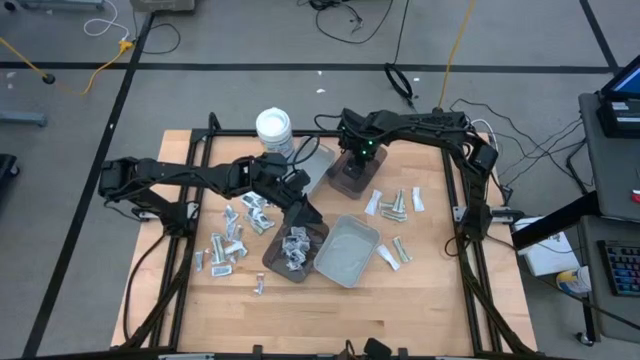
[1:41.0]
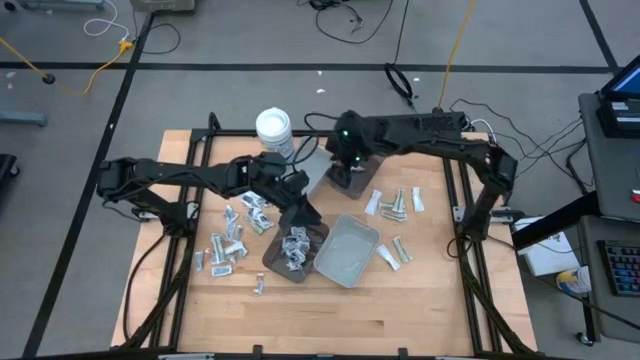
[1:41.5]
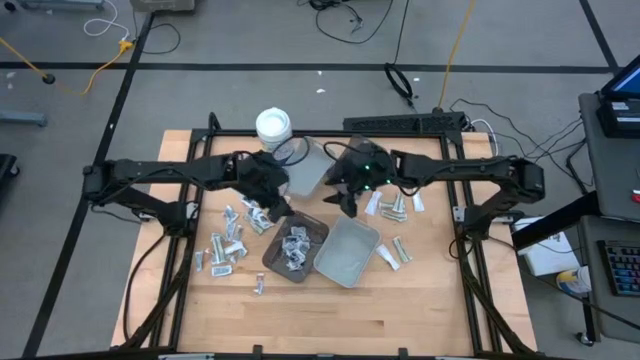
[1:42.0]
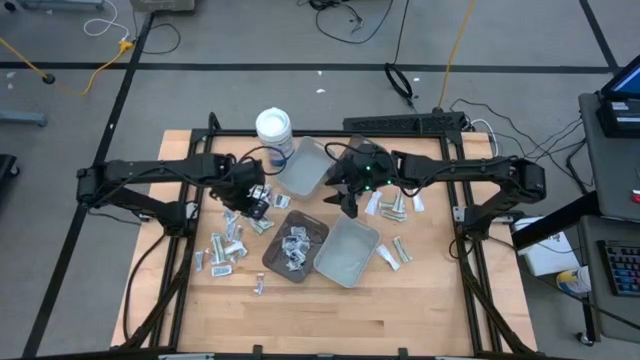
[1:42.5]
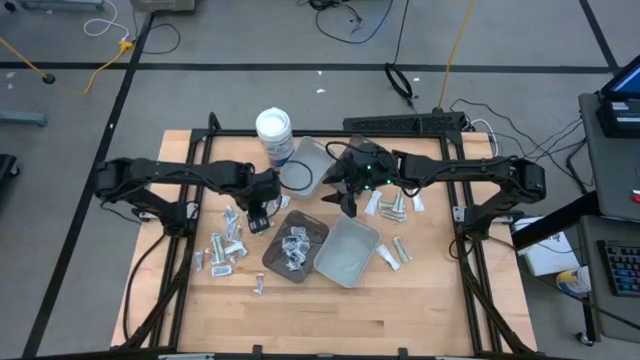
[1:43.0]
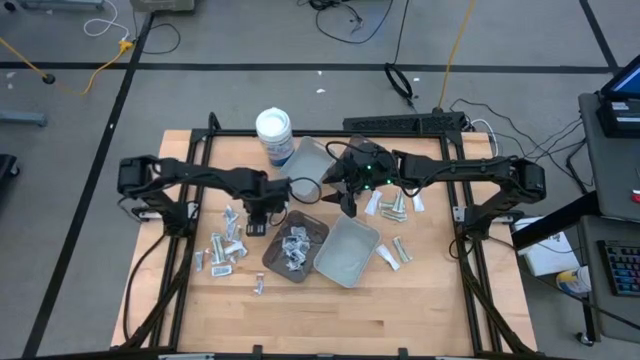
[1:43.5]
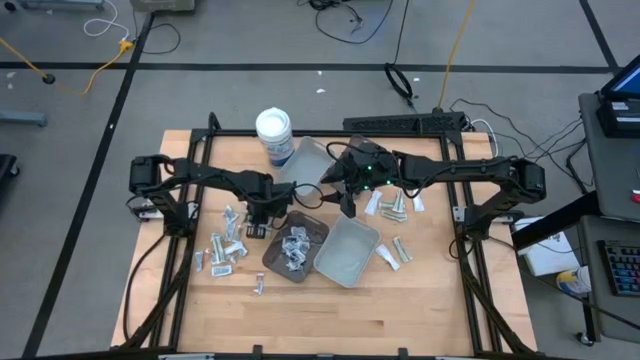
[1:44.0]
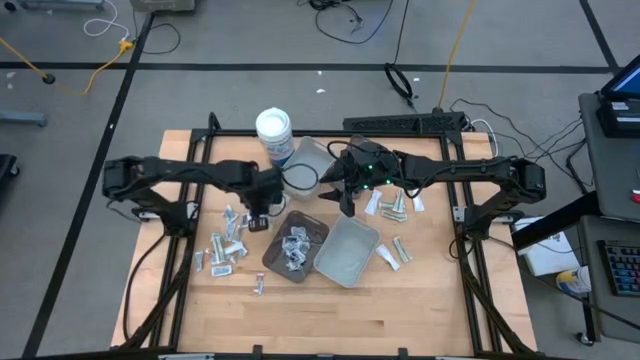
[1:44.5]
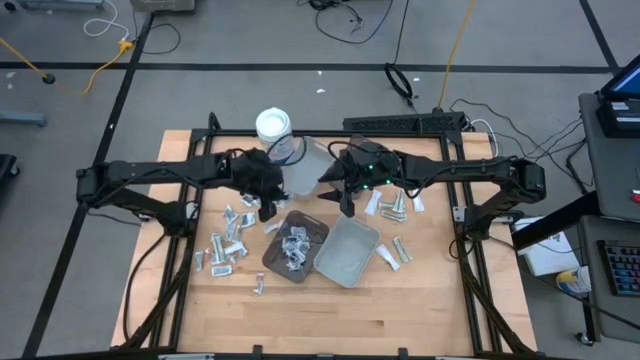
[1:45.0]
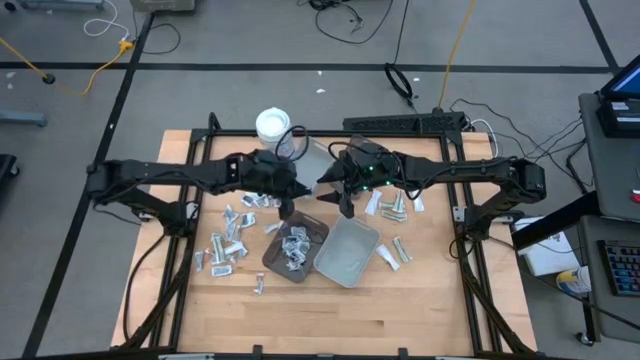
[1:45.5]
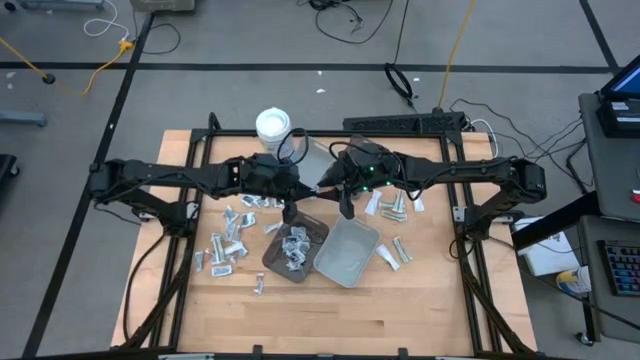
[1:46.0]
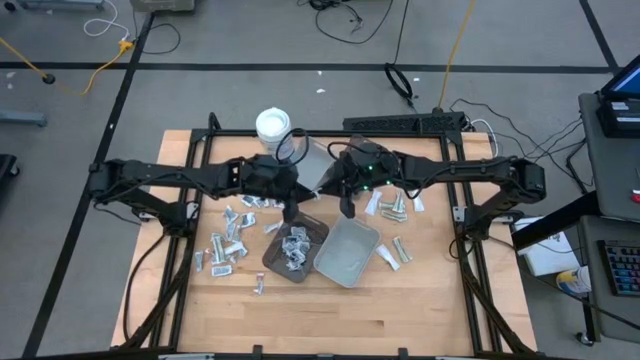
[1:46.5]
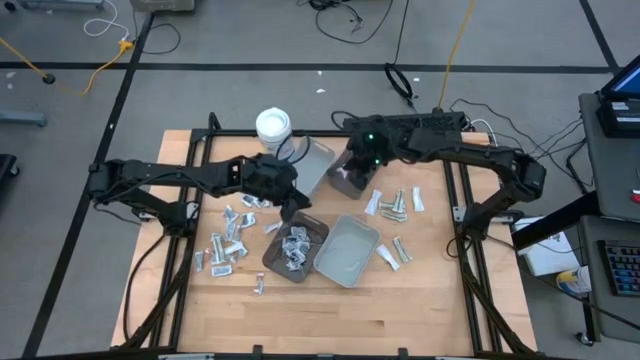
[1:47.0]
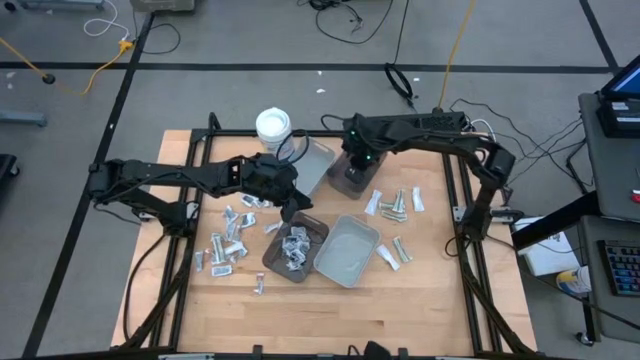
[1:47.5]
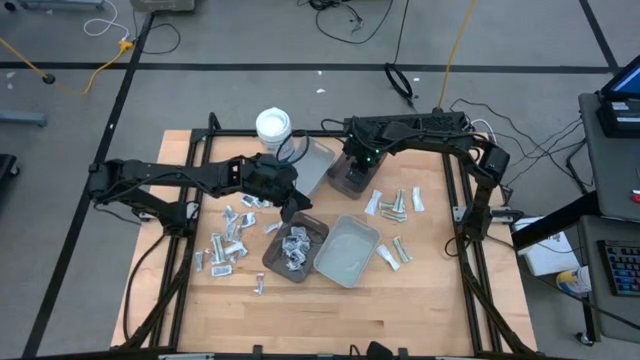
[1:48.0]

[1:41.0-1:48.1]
Task: Pick & Place First Aid Supplies
Put the black towelette pack into the top black bin

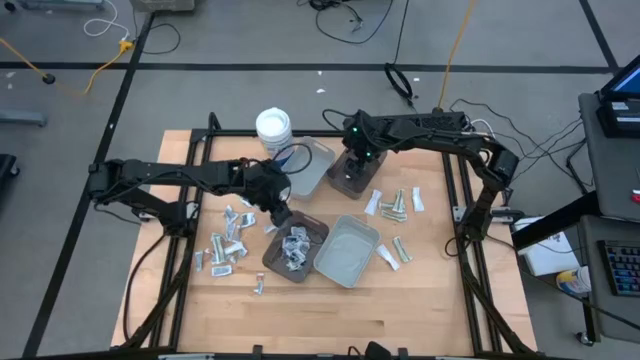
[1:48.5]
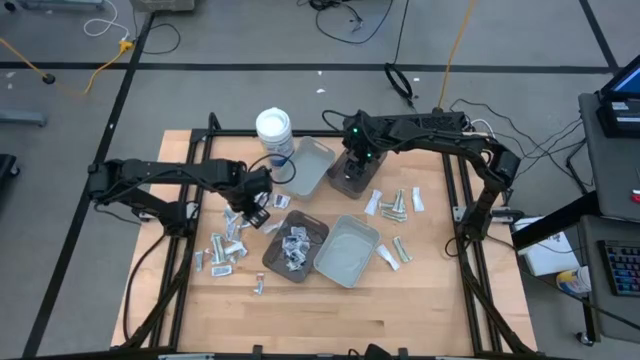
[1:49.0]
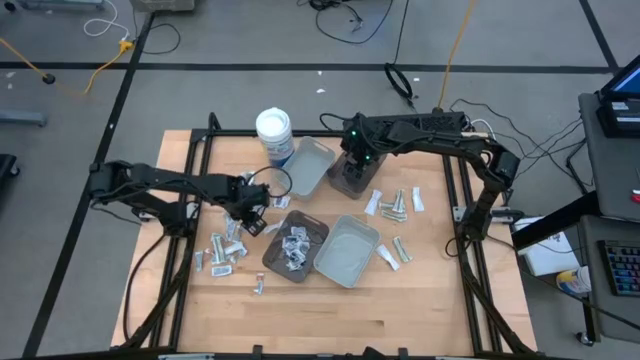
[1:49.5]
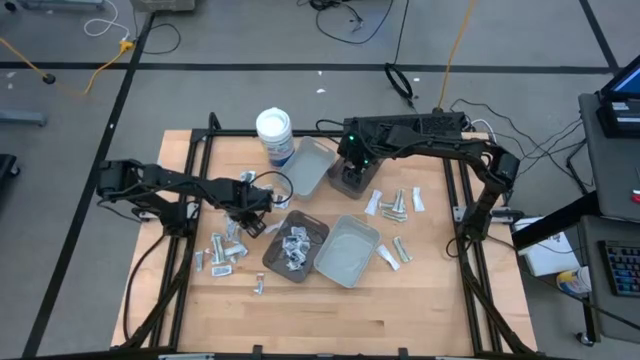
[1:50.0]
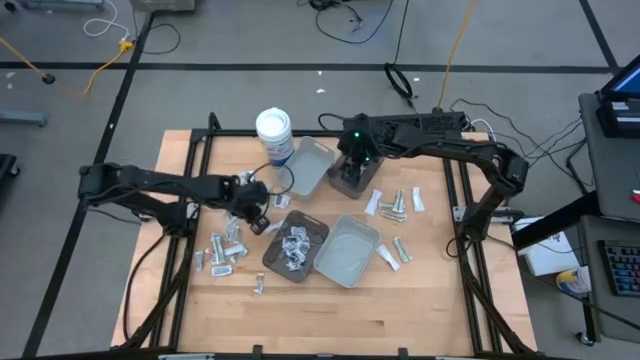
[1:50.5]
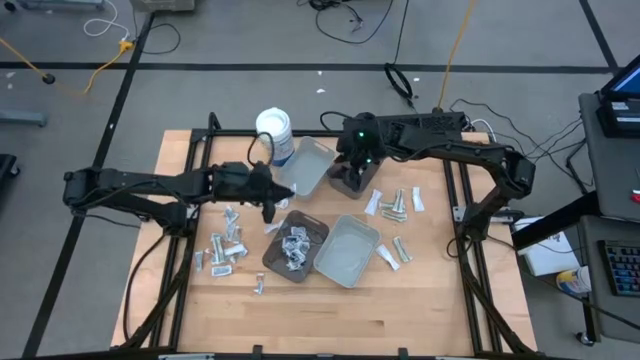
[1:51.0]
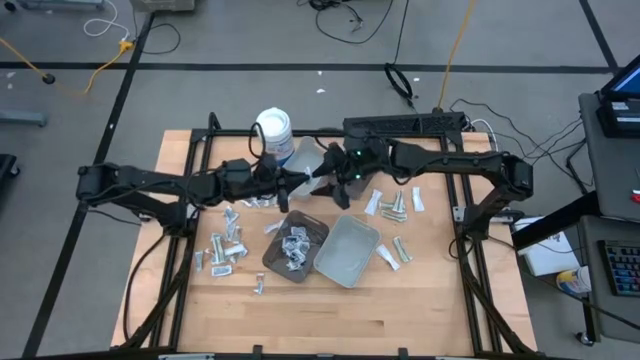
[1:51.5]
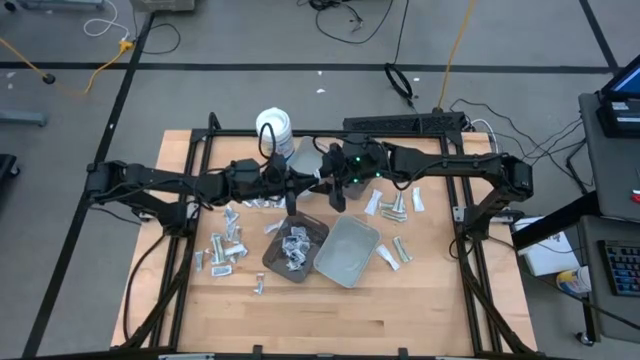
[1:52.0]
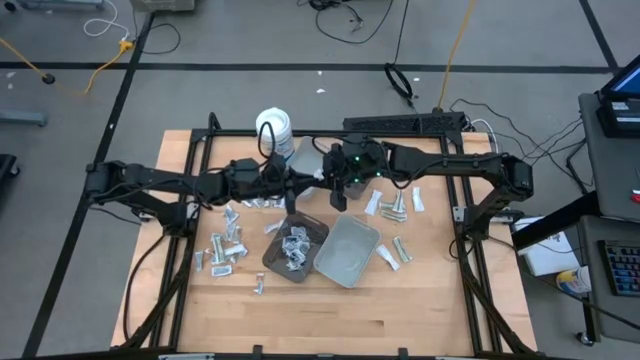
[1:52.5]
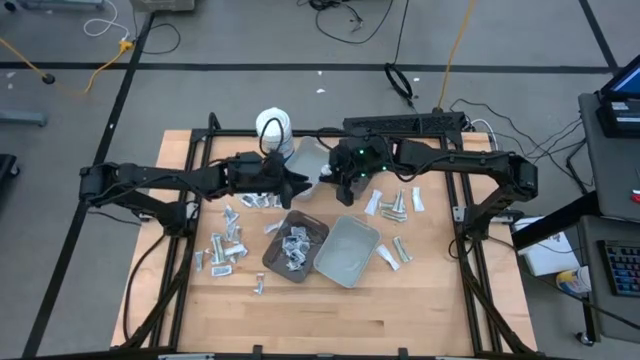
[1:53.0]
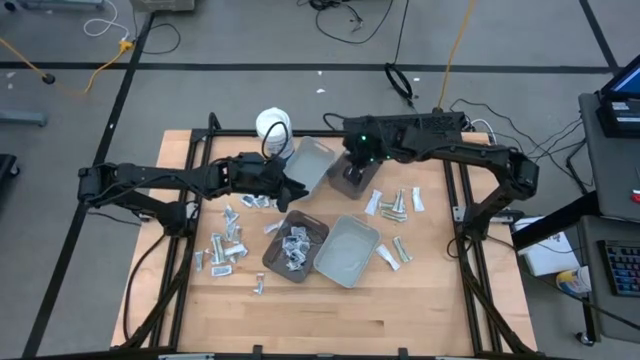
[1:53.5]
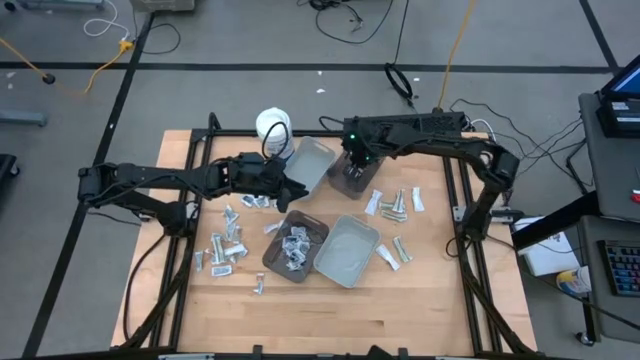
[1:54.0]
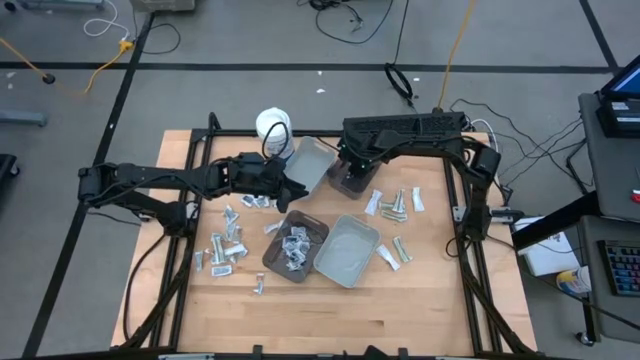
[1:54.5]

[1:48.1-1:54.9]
Put the black towelette pack into the top black bin

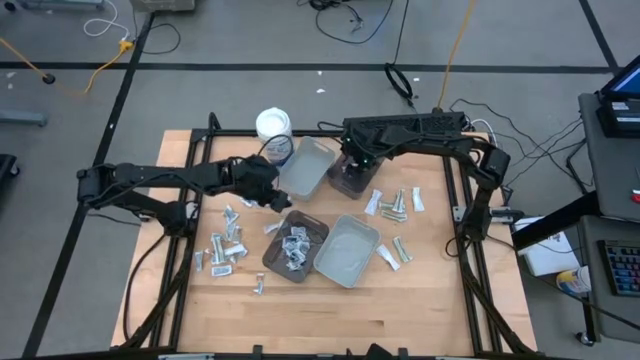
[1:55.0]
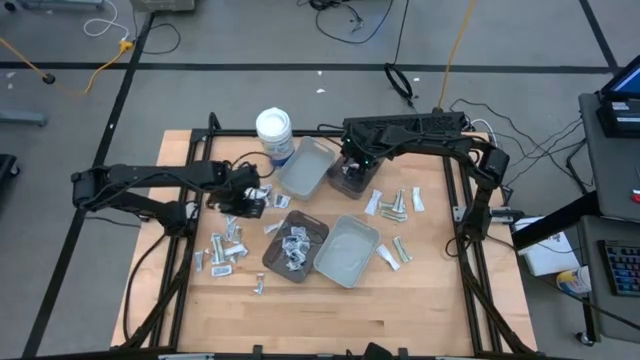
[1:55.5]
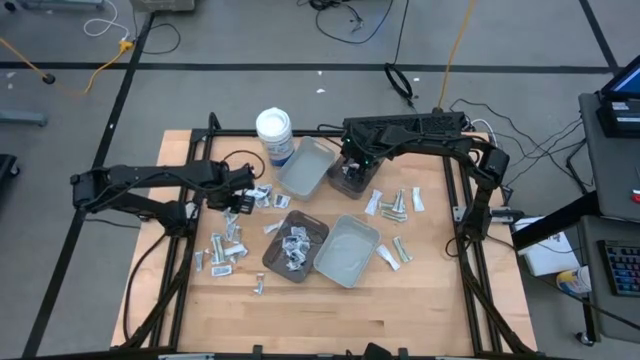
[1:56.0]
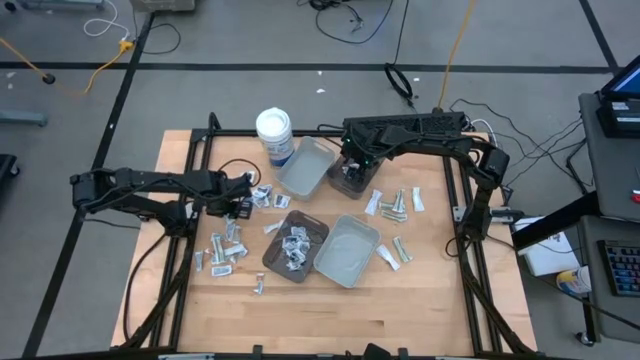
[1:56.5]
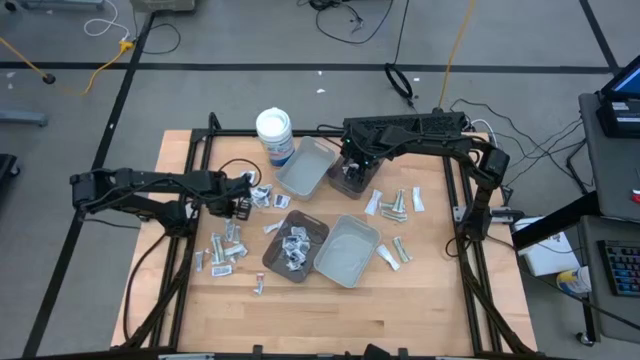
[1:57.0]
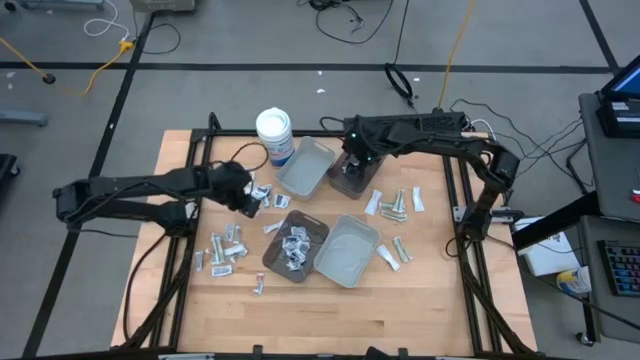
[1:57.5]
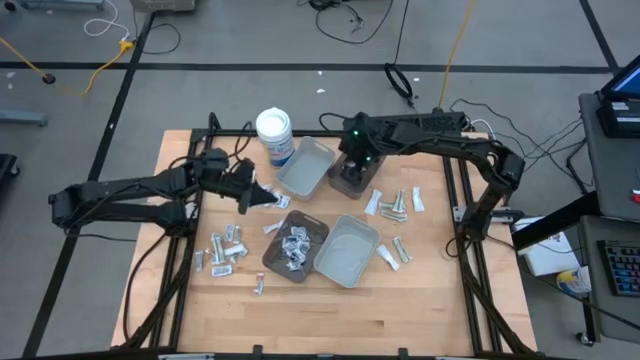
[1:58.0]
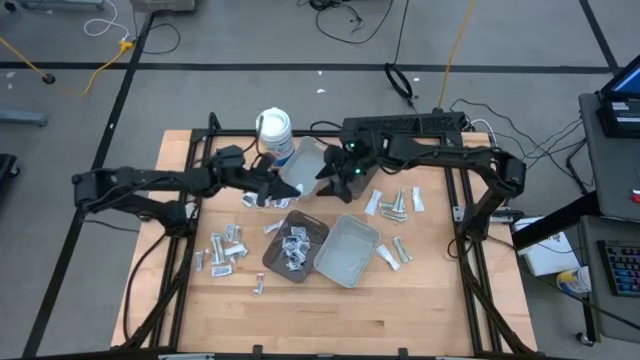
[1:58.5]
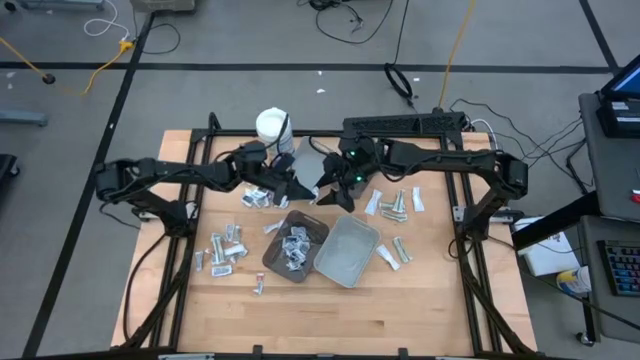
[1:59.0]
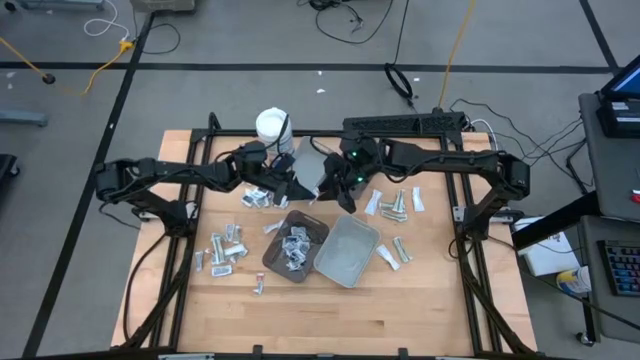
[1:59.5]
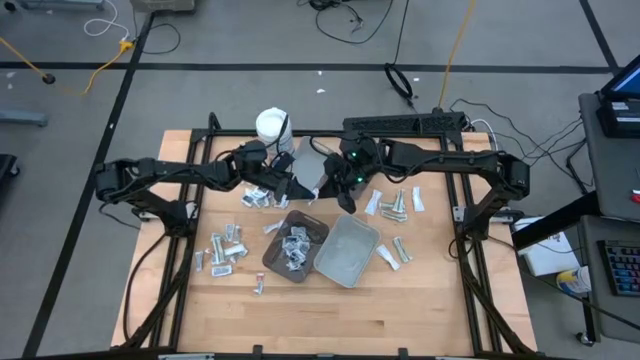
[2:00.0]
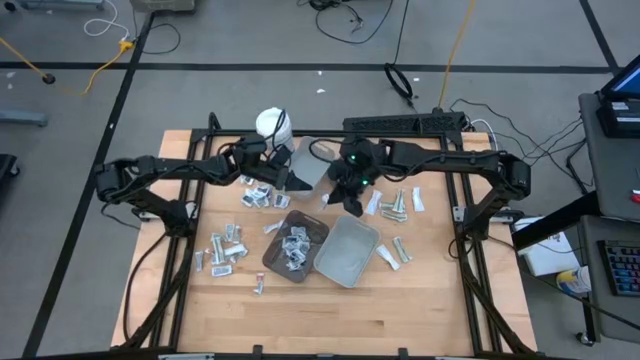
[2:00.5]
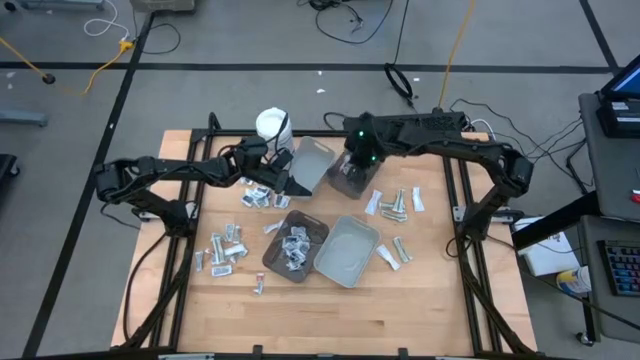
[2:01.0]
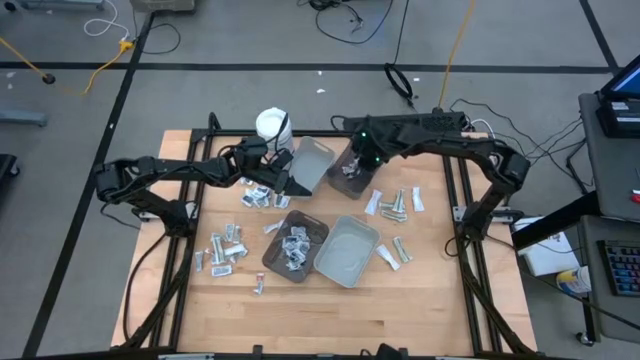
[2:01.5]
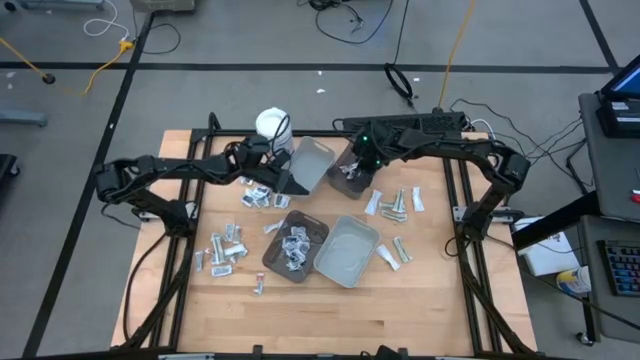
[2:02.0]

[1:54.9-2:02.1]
Put the black towelette pack into the top black bin

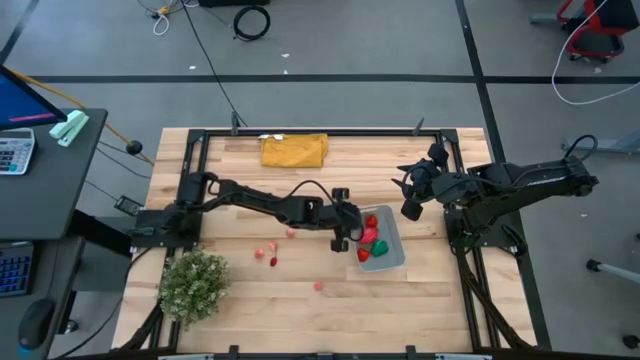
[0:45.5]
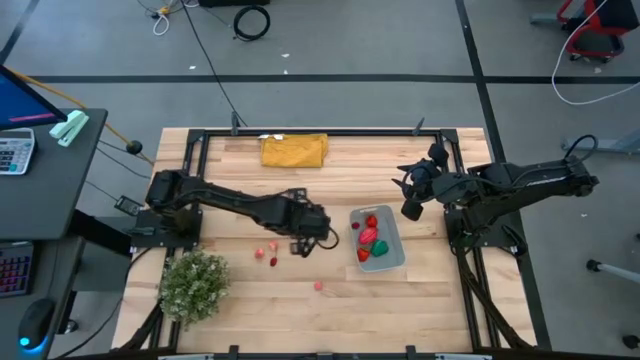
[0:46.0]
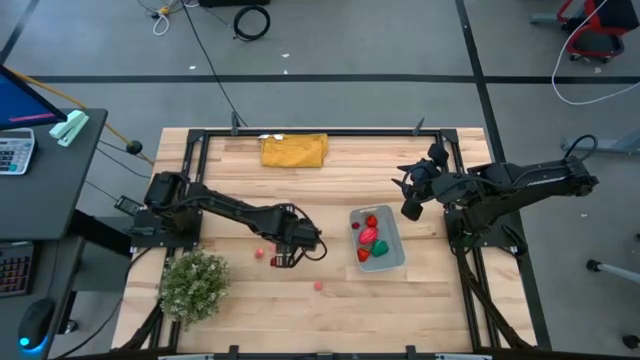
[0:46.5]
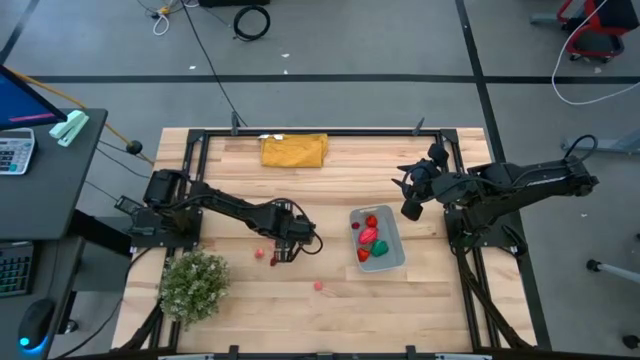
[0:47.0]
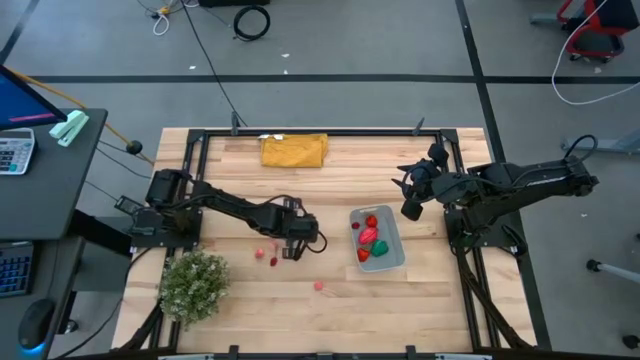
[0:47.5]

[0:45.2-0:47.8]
Task: Pick and placing Produce into tupperware
Put the pink peach into the gray bin
